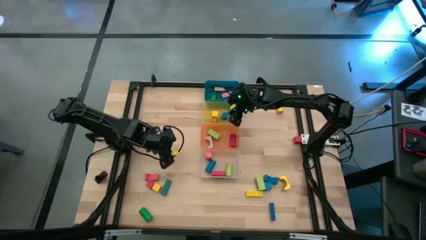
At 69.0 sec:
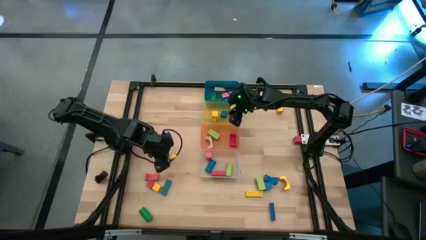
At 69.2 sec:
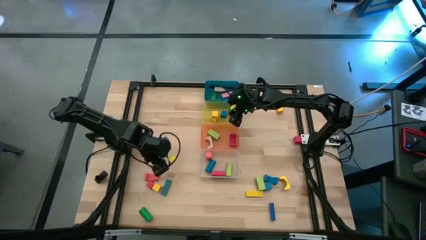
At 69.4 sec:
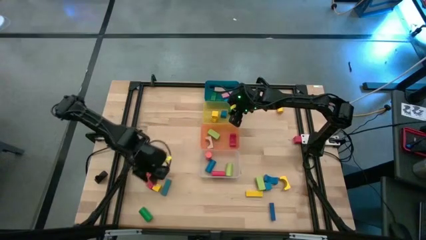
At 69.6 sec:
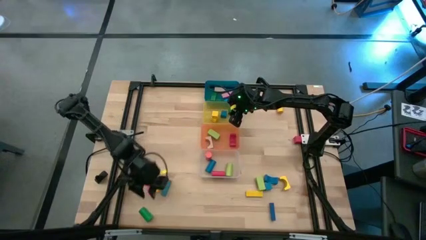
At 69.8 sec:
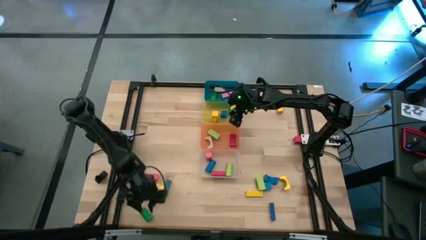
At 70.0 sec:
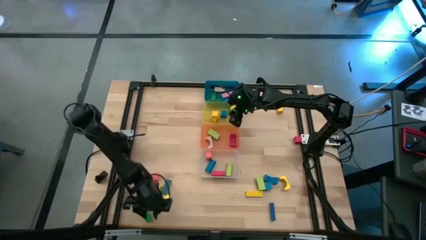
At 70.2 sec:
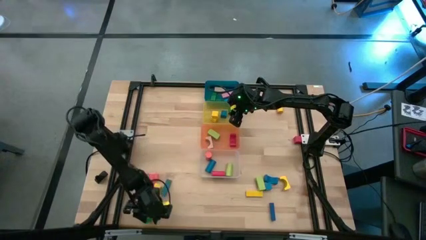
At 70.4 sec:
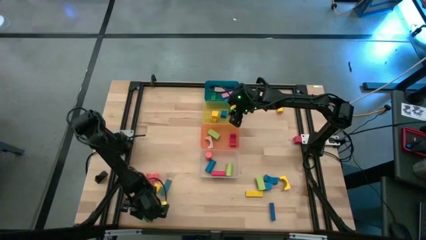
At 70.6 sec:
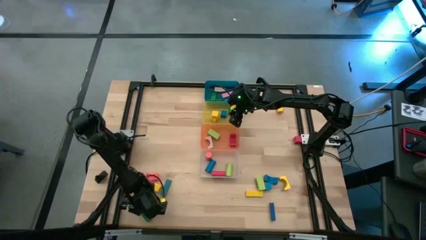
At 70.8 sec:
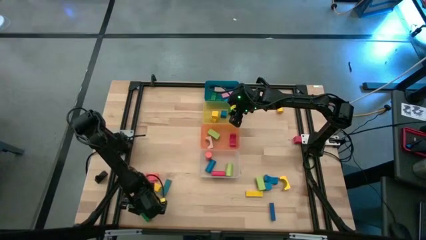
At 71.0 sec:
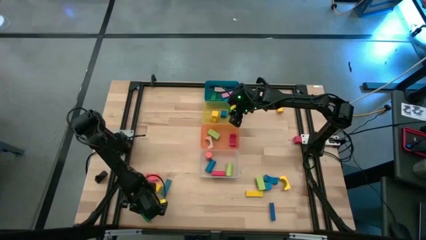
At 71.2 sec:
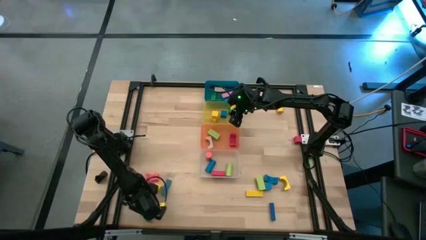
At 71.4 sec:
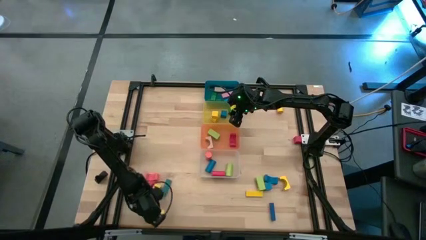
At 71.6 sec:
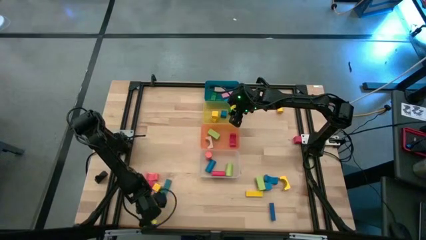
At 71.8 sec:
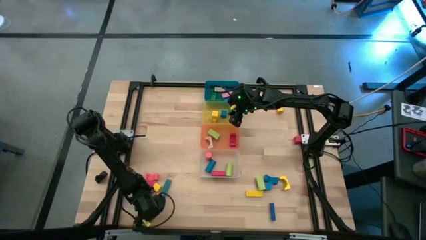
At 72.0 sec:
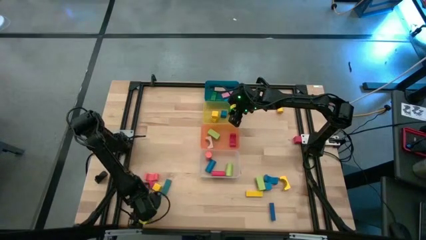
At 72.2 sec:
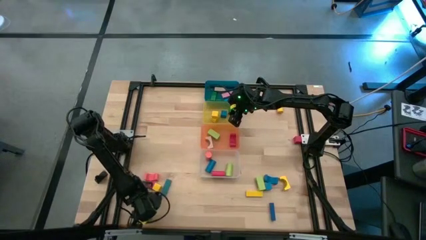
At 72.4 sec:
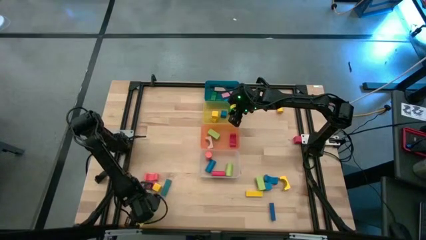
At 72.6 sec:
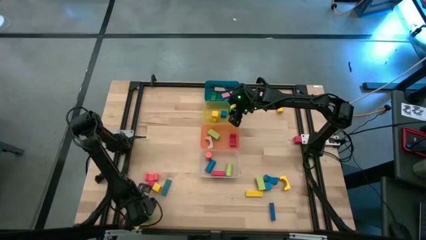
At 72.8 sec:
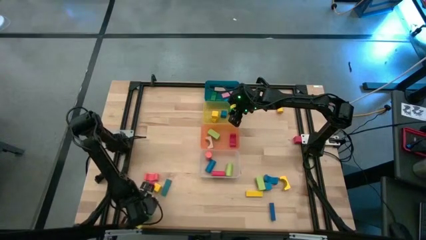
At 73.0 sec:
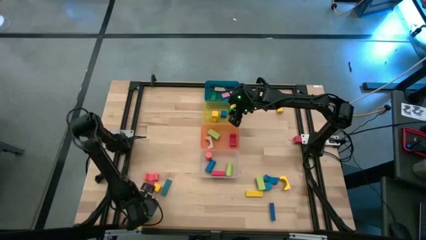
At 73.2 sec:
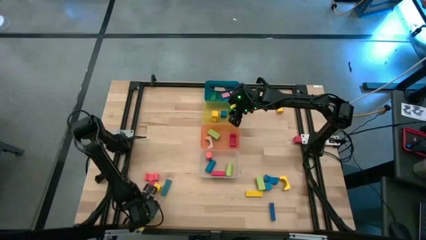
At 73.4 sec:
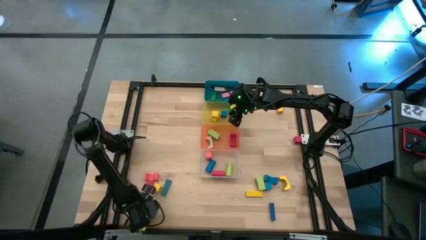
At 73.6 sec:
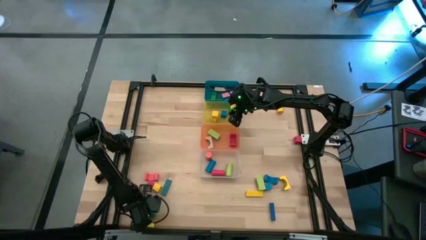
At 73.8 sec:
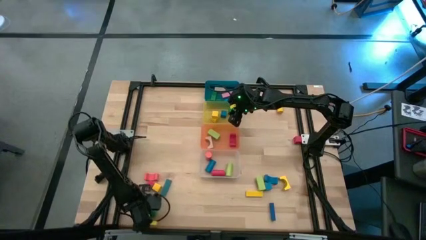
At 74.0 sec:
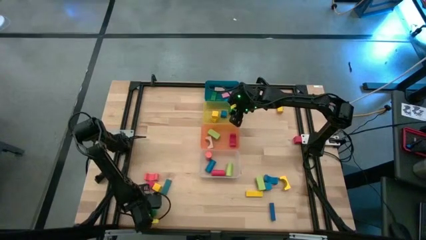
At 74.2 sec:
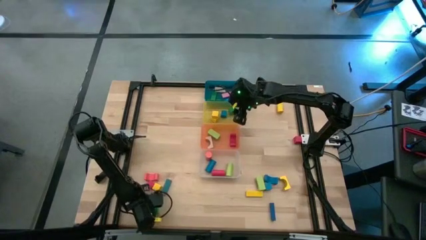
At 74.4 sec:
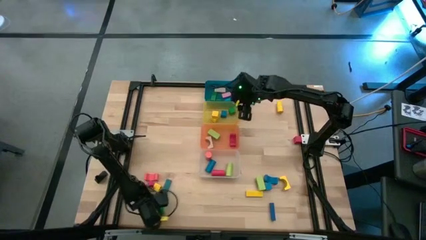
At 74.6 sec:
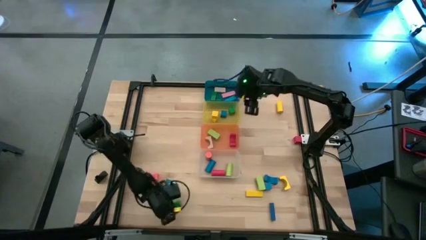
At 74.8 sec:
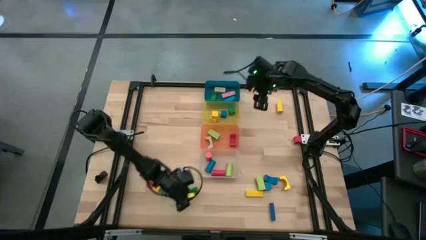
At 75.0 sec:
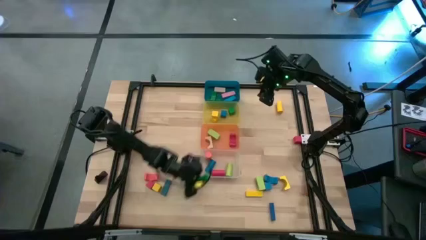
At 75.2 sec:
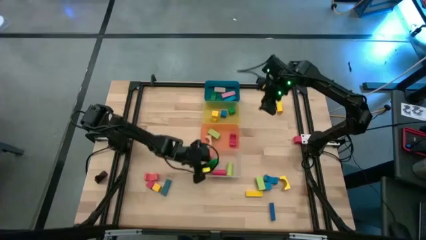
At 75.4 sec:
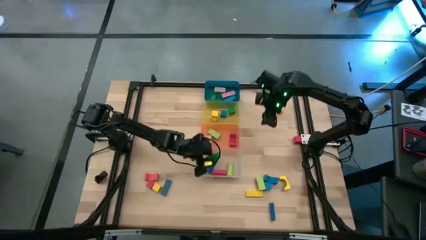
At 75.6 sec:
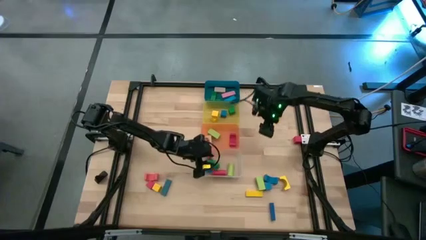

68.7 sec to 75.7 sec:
Task: Sort blocks by size
Put the green cylindrical block into the transparent bin

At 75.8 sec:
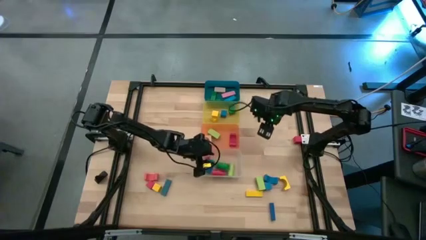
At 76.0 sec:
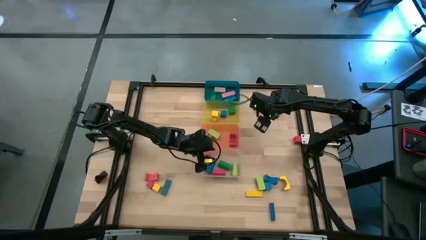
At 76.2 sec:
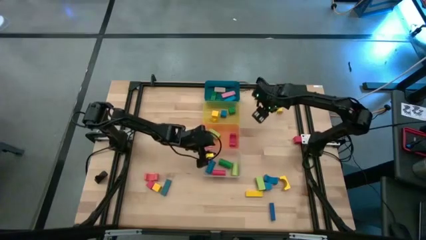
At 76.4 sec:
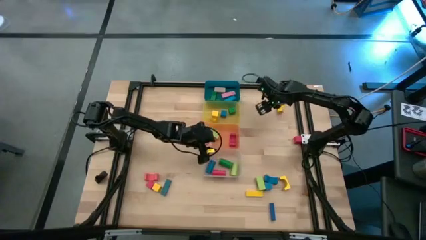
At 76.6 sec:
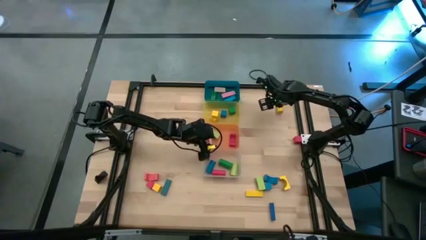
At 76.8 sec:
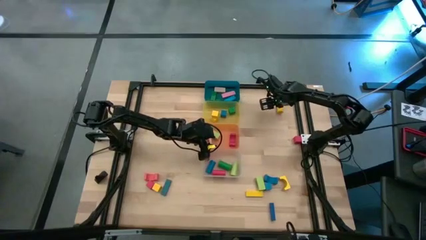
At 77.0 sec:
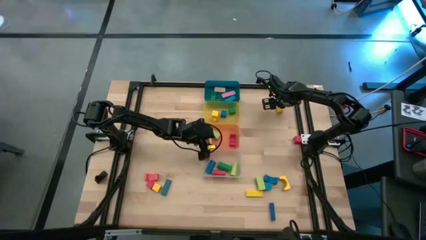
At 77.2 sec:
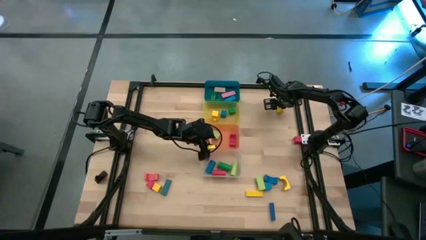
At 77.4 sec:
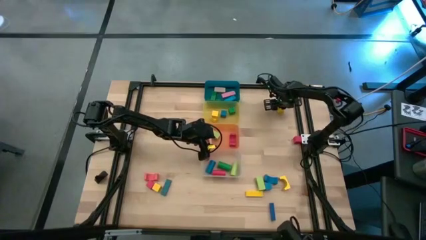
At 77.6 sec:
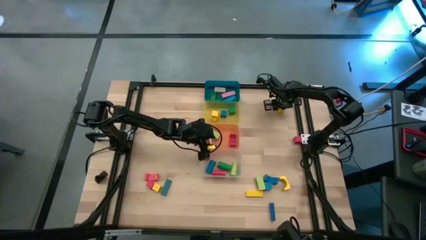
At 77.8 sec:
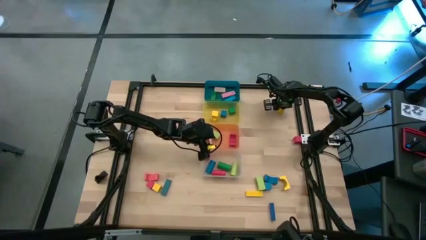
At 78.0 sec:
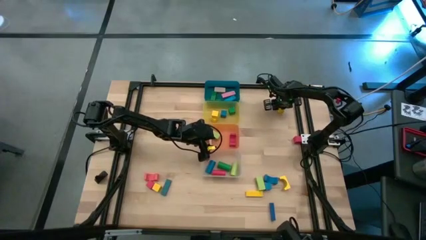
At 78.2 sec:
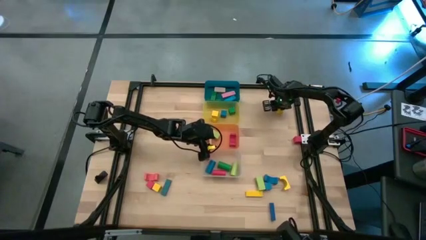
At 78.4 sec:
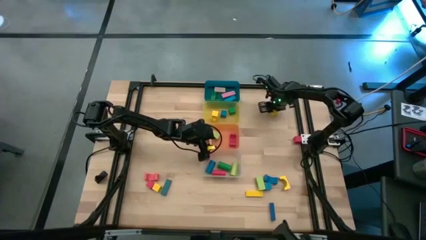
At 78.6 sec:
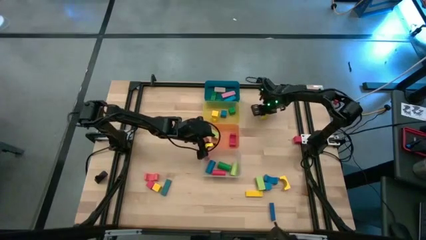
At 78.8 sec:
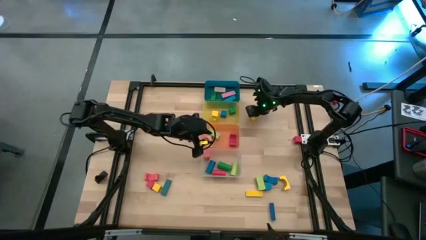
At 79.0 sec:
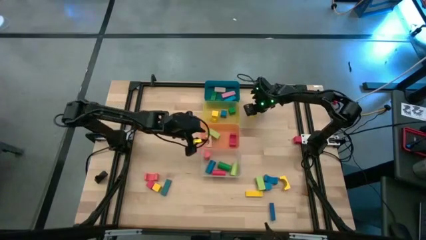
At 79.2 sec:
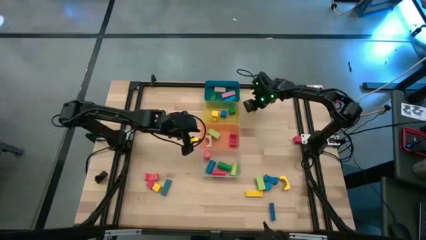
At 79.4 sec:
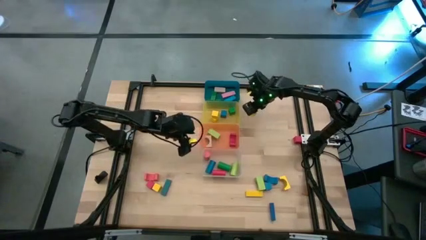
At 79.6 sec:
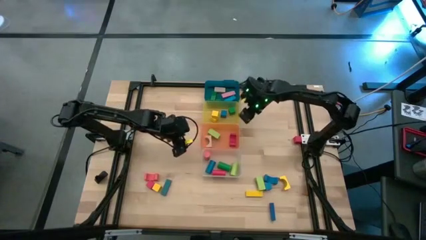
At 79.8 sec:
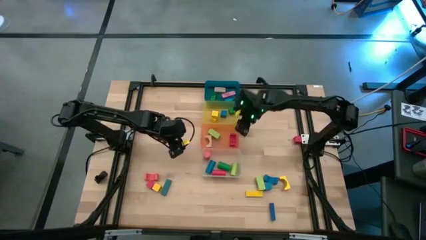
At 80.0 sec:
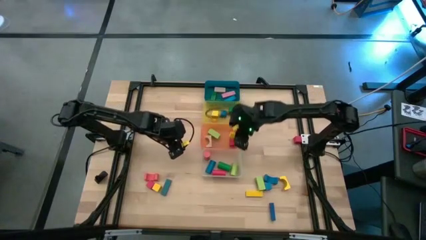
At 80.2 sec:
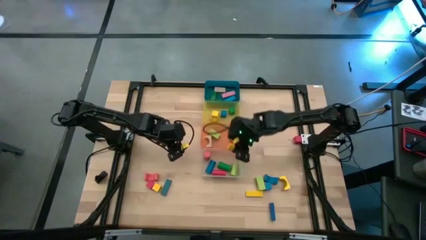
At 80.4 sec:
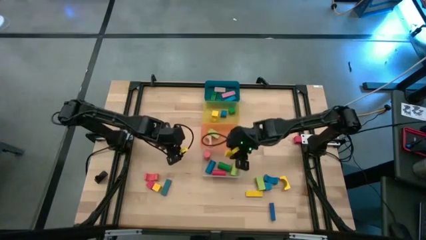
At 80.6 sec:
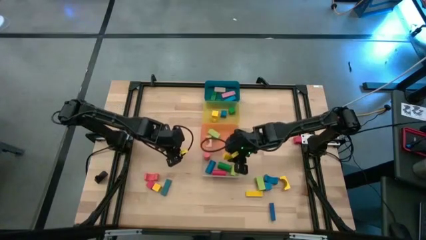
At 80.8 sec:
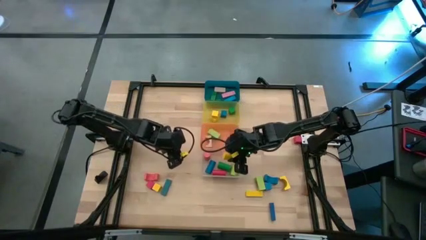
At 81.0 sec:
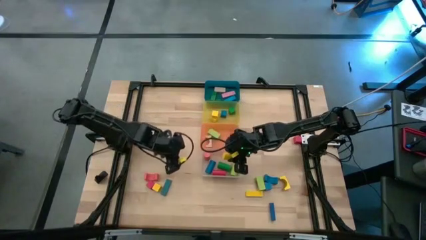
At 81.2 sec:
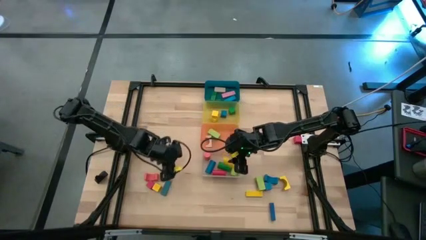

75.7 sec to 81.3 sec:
Put the yellow cylindrical block into the transparent bin

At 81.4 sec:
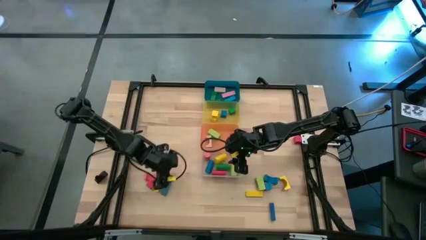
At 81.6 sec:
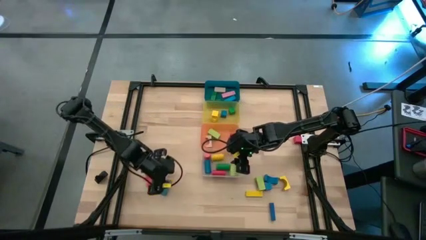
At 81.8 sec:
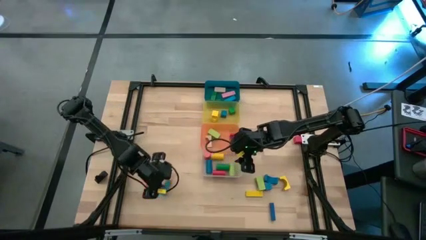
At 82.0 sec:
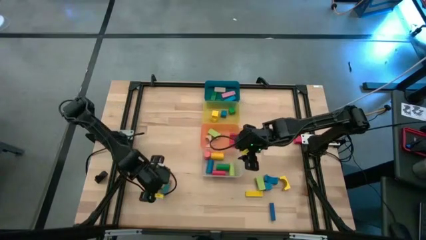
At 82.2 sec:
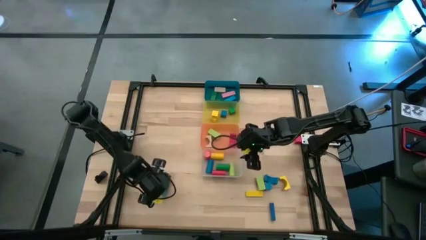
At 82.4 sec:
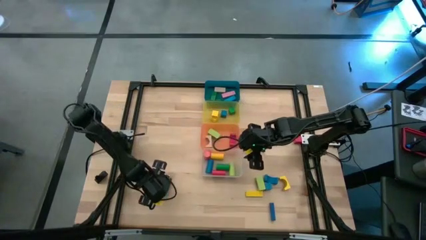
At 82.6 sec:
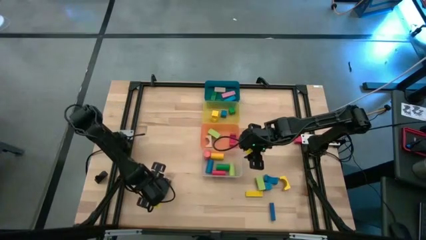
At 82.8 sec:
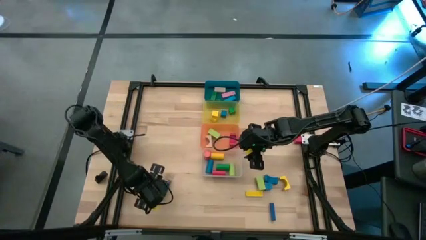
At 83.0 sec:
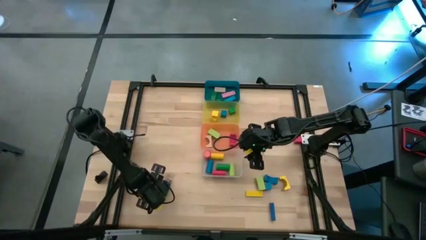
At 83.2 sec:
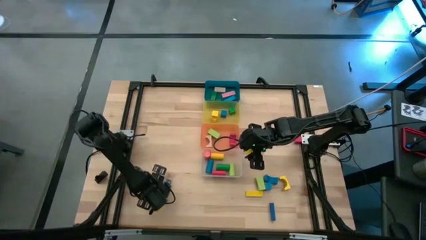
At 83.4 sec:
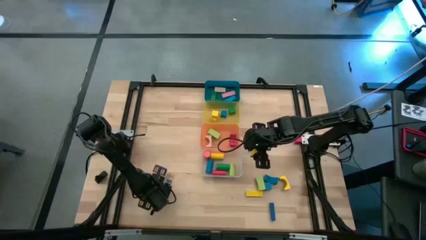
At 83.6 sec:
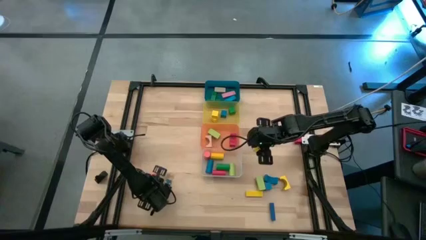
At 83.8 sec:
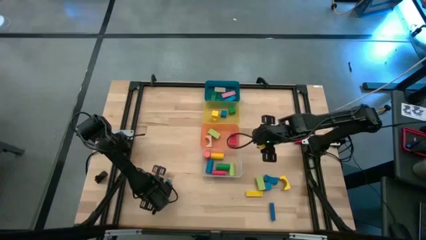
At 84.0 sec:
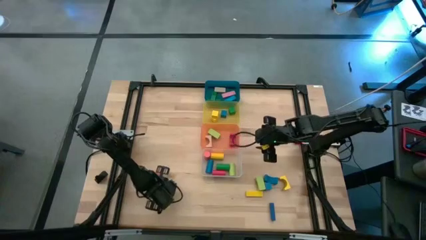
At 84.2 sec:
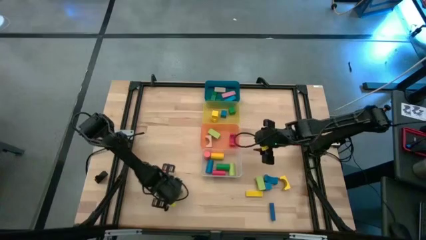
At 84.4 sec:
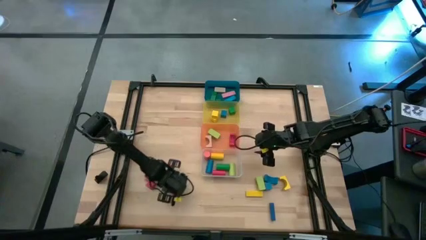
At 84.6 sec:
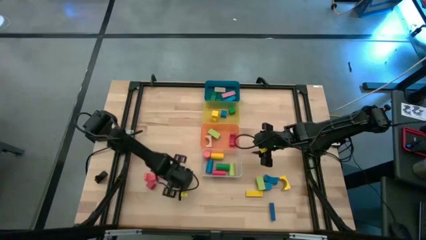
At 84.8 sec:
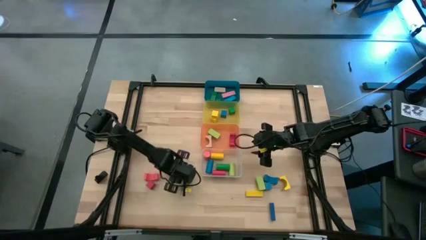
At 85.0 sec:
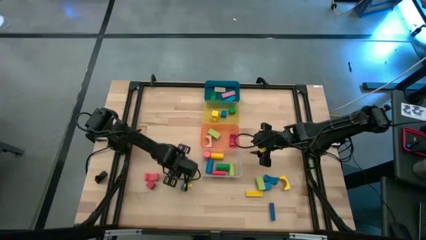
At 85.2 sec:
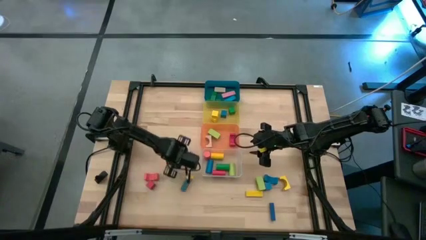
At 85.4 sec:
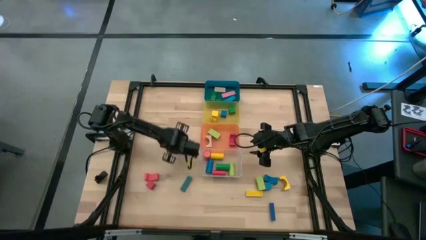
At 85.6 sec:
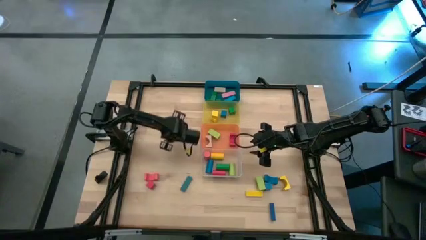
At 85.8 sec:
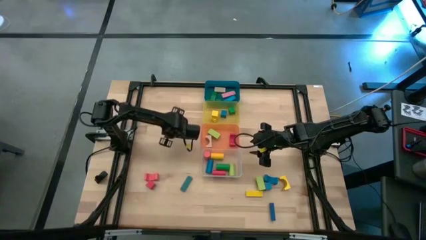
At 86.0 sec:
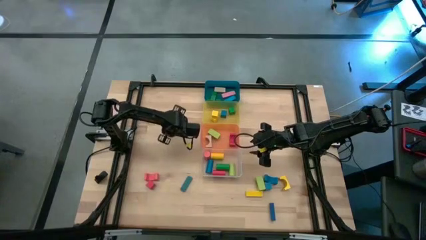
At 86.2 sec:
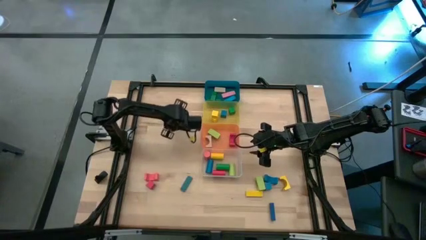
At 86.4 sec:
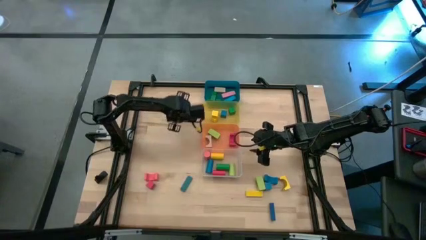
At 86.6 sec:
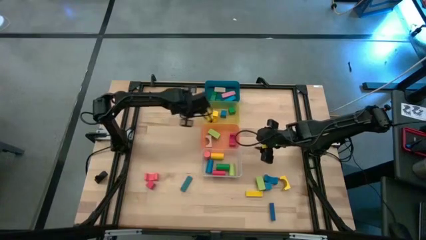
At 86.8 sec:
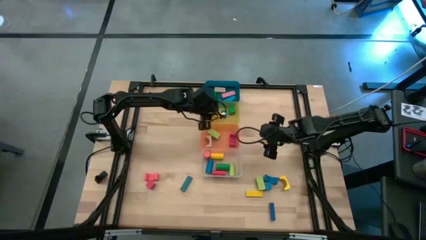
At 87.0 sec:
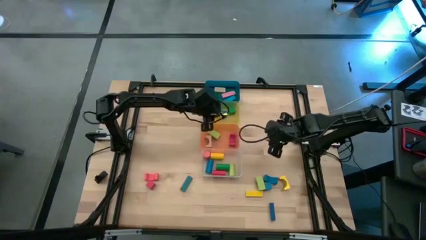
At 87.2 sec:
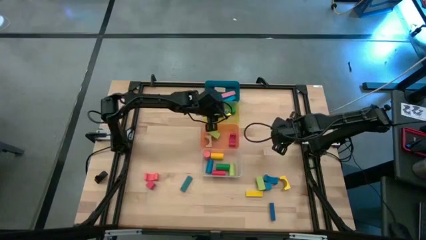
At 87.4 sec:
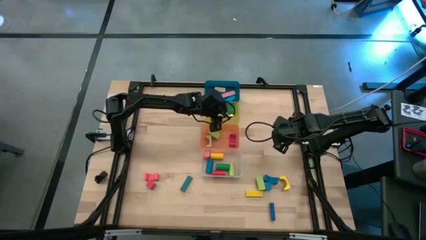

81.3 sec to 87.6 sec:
Put the yellow square block into the yellow bin
